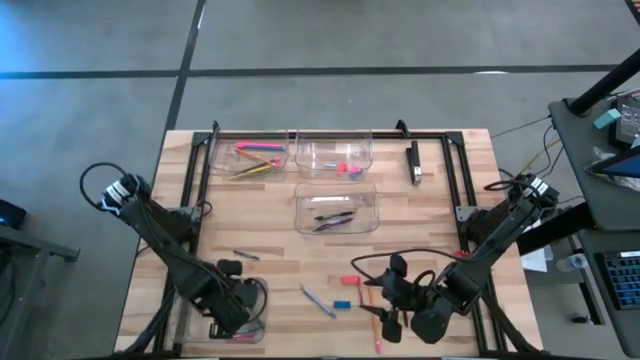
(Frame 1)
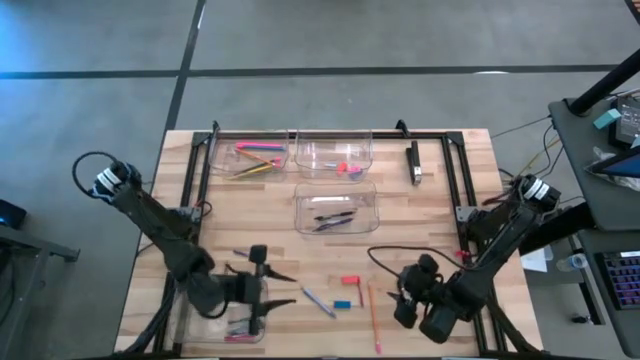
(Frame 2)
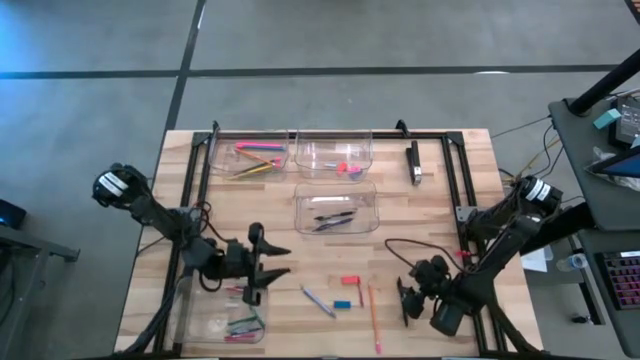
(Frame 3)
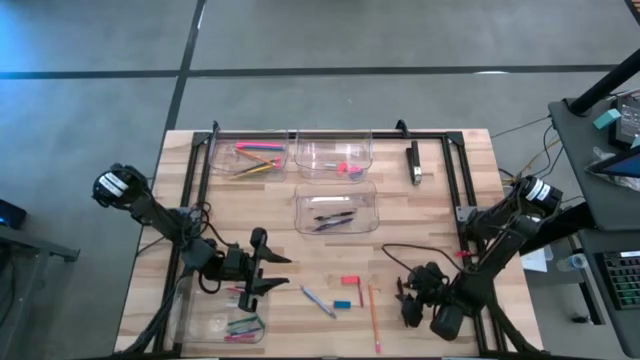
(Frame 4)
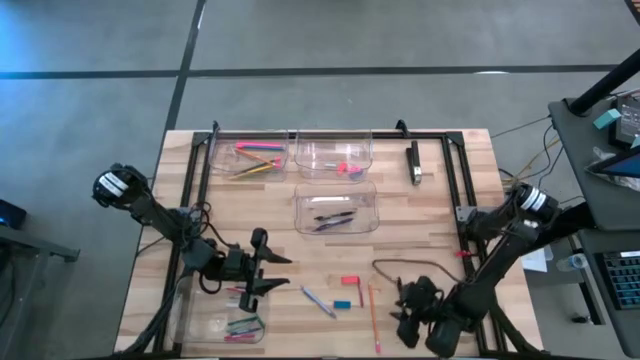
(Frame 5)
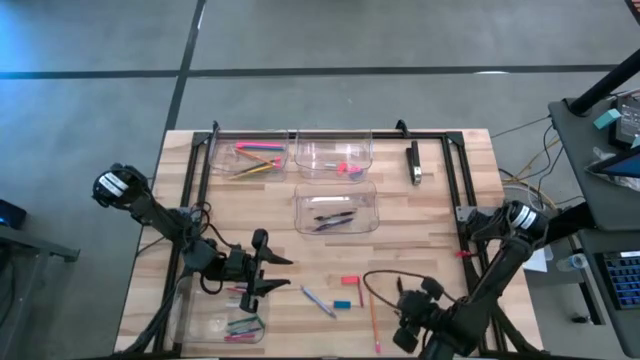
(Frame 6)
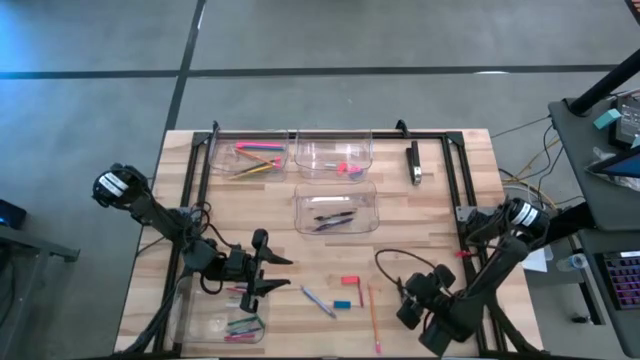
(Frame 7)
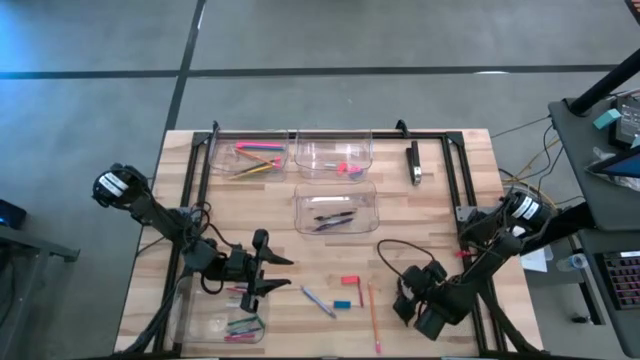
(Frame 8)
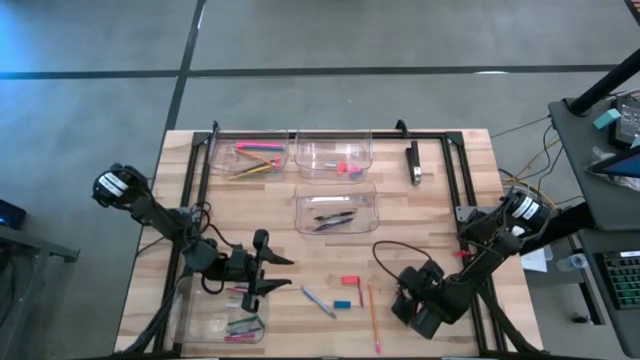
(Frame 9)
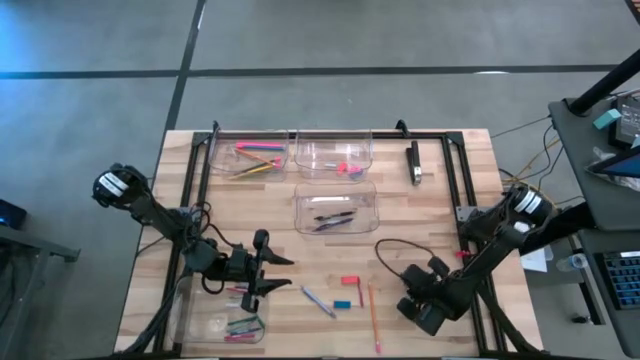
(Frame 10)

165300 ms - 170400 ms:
Task: Sort crayons/erasers/pens/pencils in bins
Put the black pen into the middle transparent bin

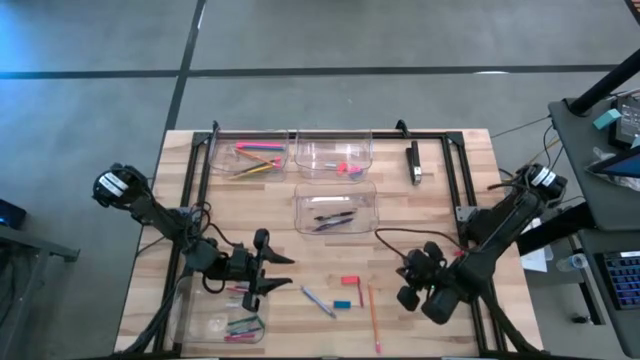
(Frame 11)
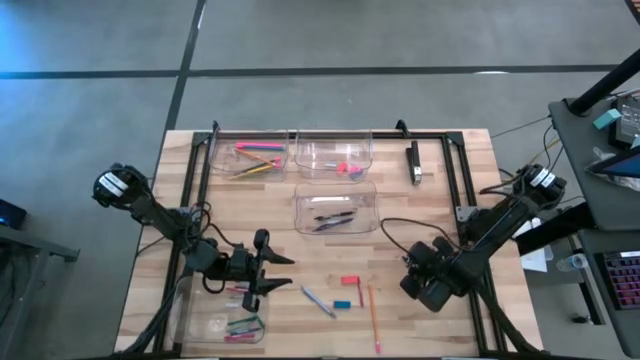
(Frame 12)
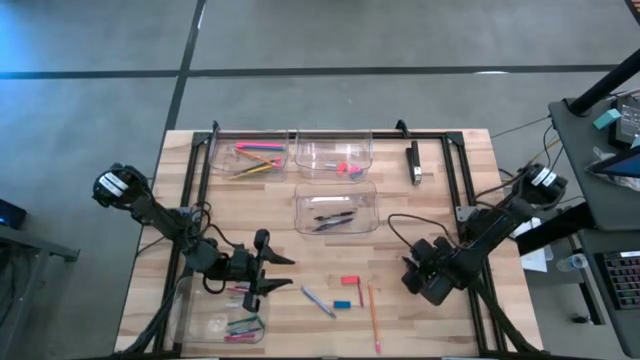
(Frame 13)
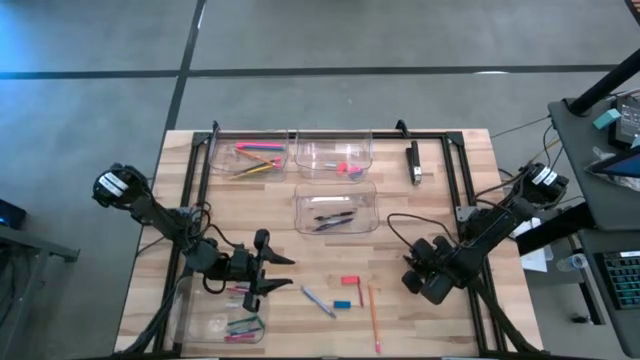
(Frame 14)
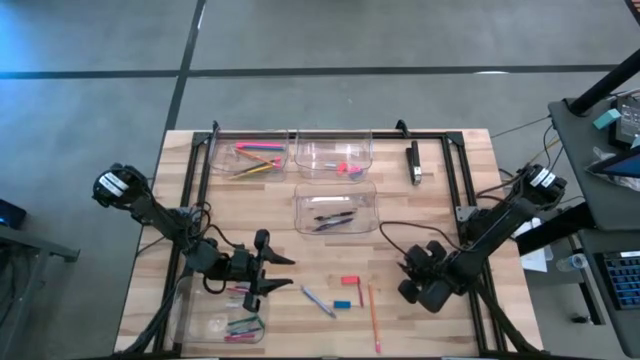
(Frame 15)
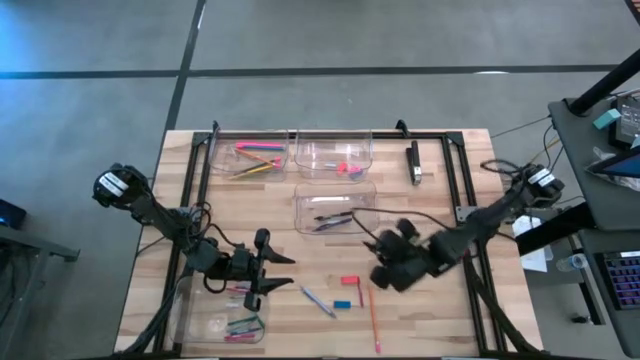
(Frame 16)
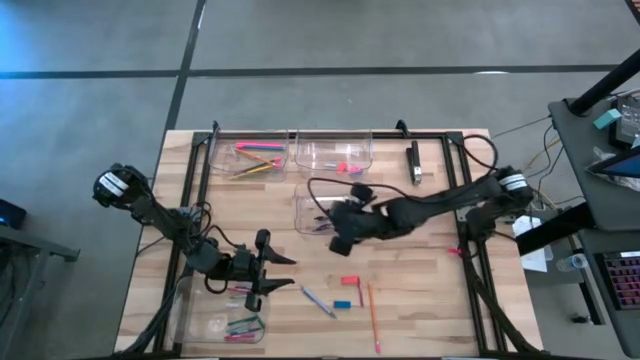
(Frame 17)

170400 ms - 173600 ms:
Put the black pen into the middle transparent bin

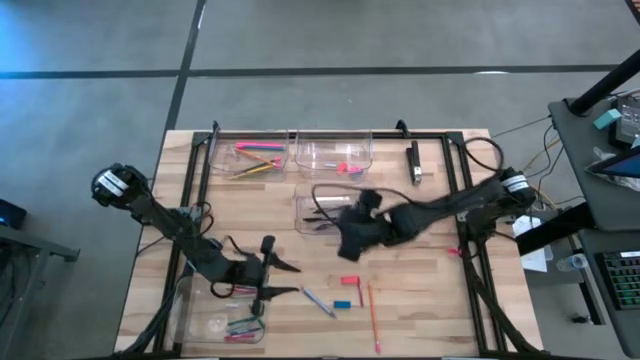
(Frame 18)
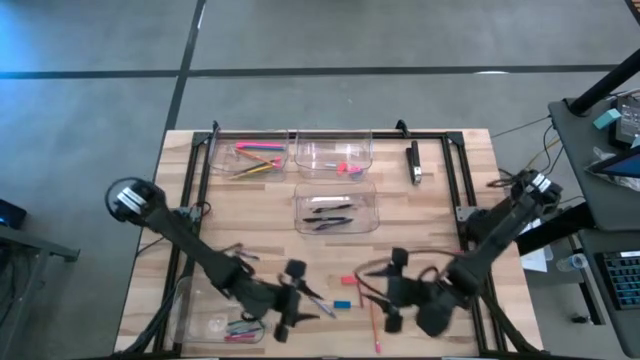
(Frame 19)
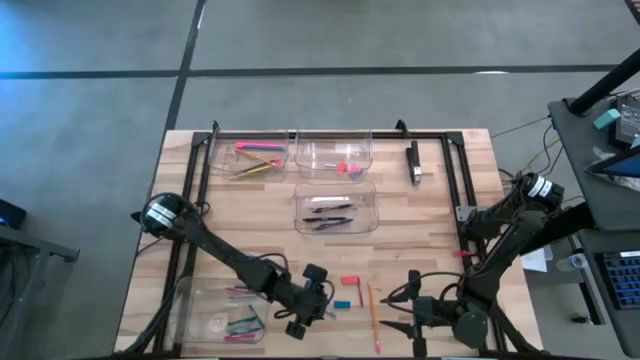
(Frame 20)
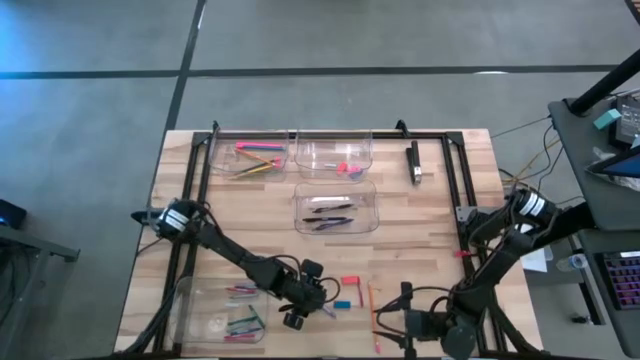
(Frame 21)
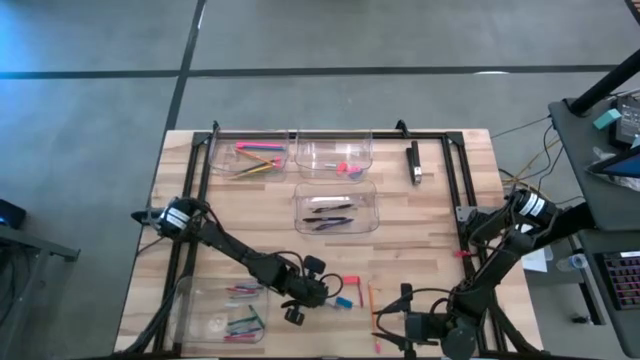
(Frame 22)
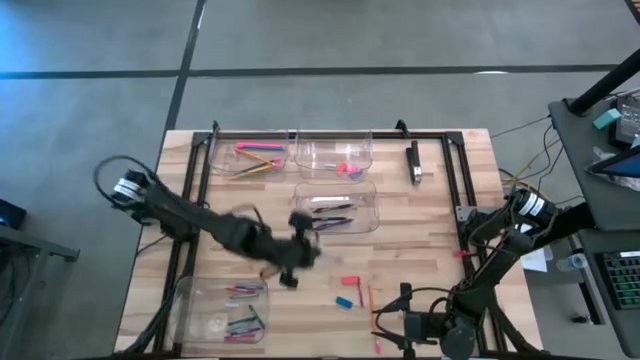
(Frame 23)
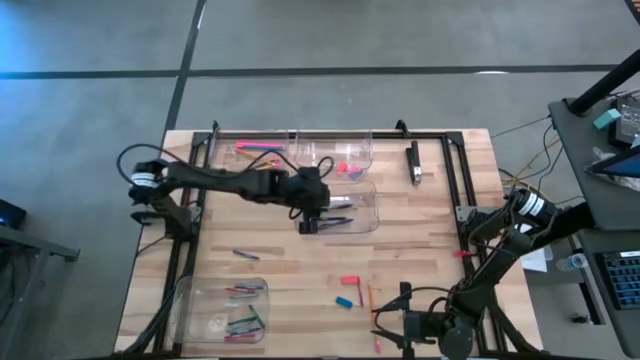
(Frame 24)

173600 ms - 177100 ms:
Put the violet pen into the middle transparent bin

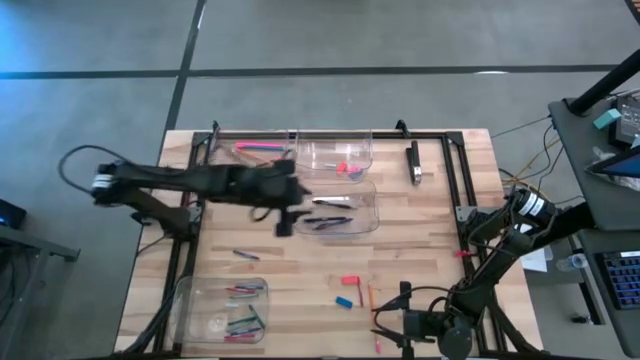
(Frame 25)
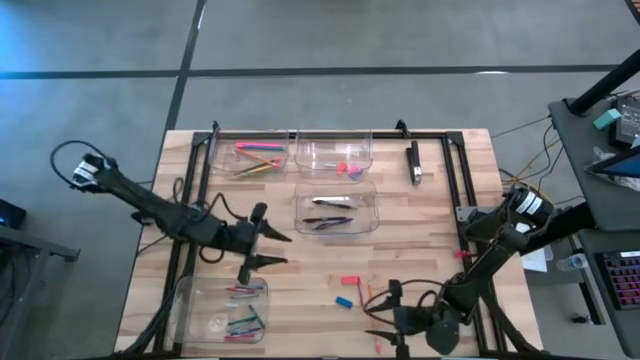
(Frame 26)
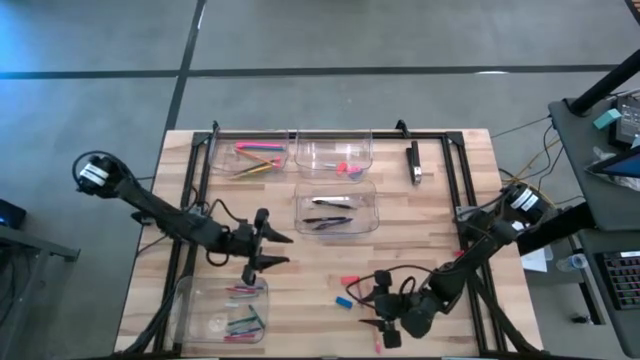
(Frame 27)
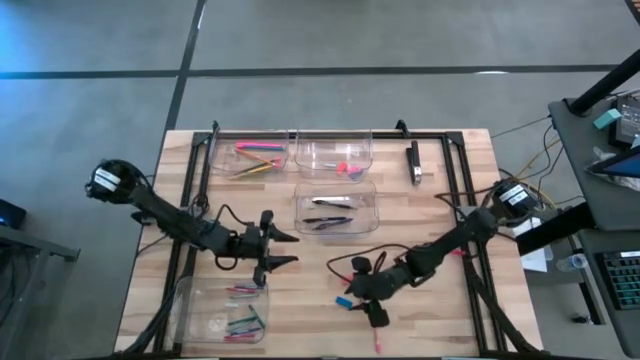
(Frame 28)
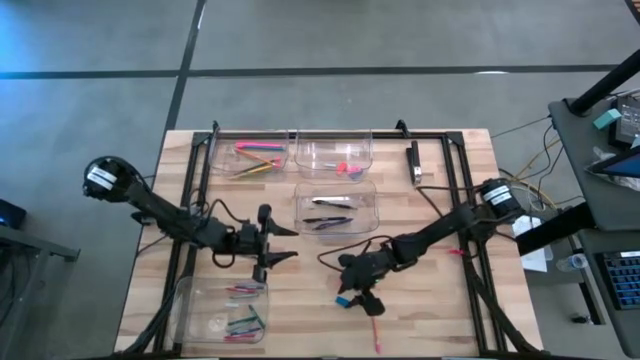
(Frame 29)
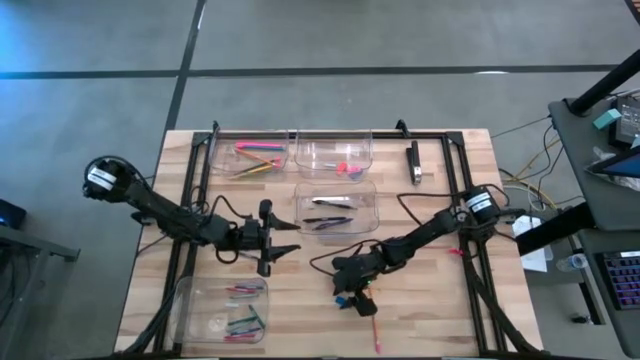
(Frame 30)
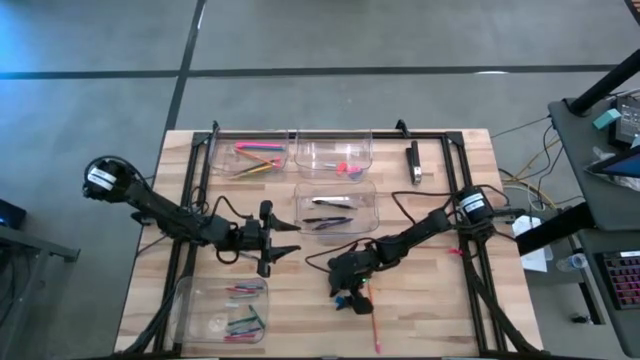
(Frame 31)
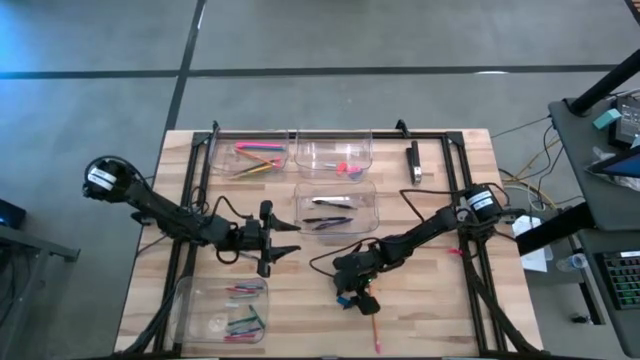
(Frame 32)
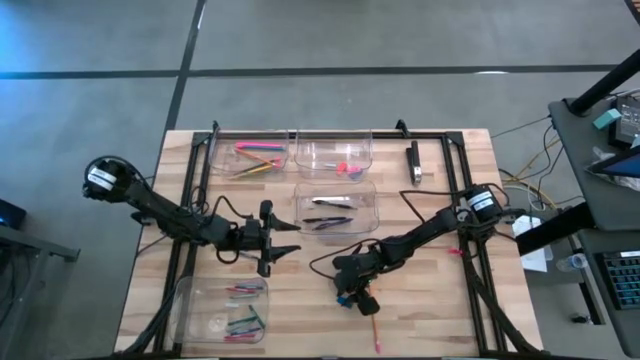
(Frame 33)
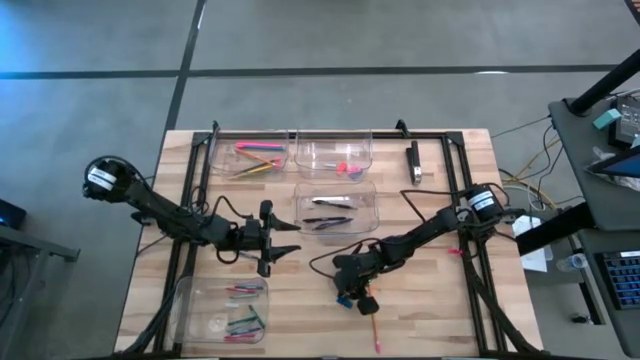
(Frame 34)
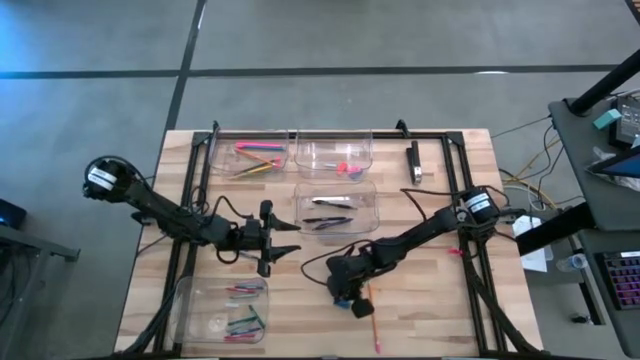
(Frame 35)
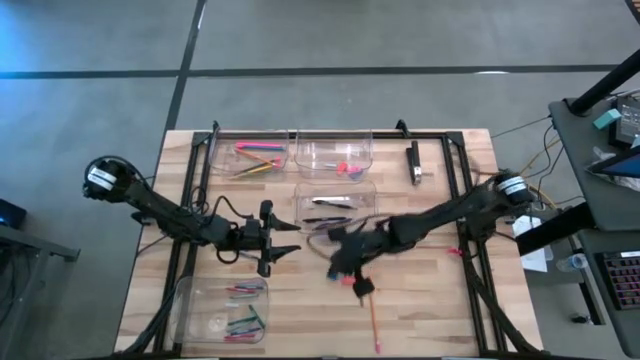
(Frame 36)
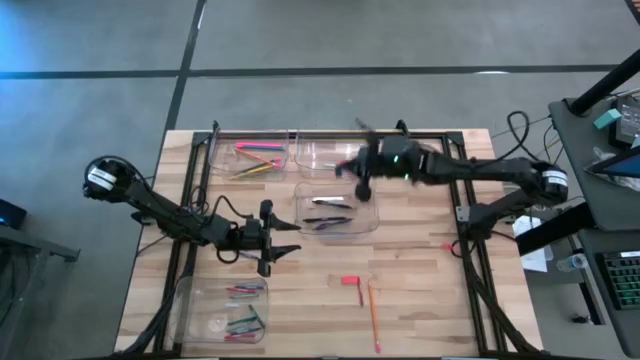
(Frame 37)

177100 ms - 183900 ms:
Put the blue eraser into the top right transparent bin

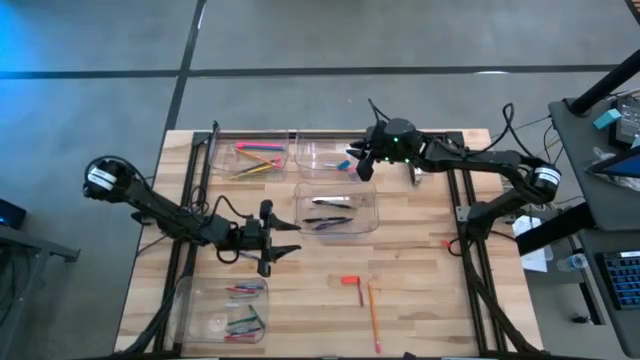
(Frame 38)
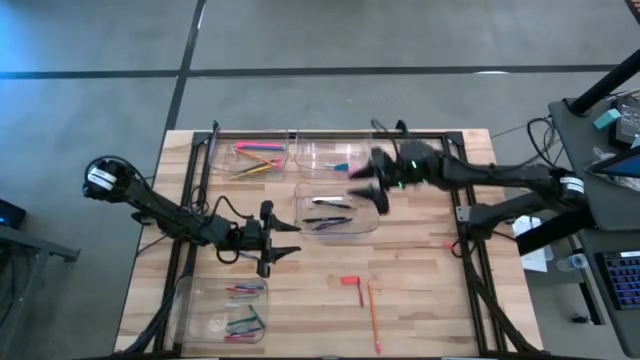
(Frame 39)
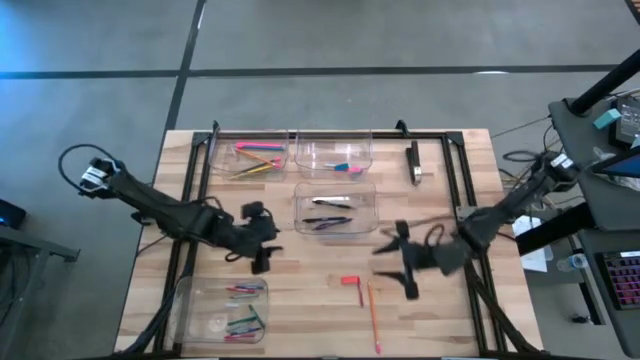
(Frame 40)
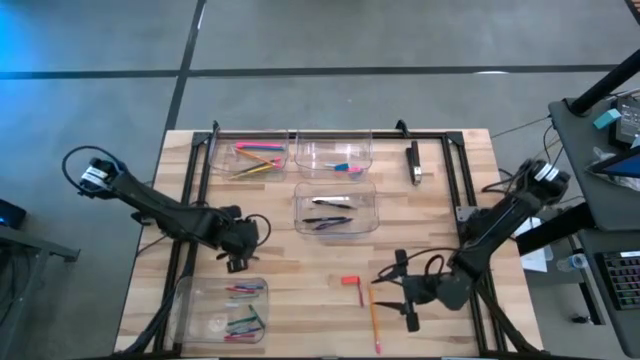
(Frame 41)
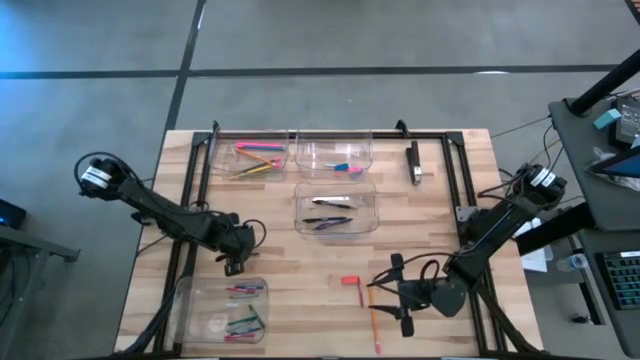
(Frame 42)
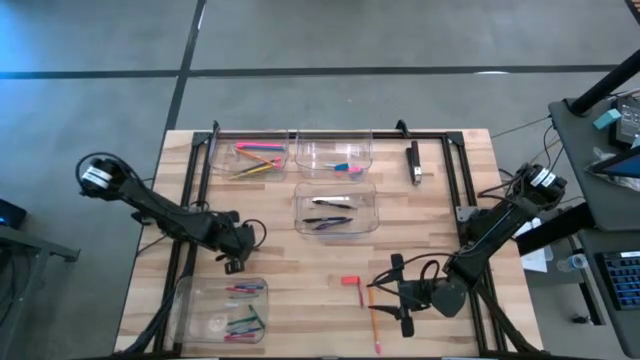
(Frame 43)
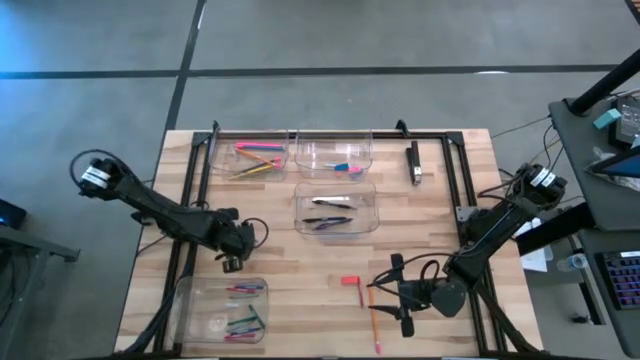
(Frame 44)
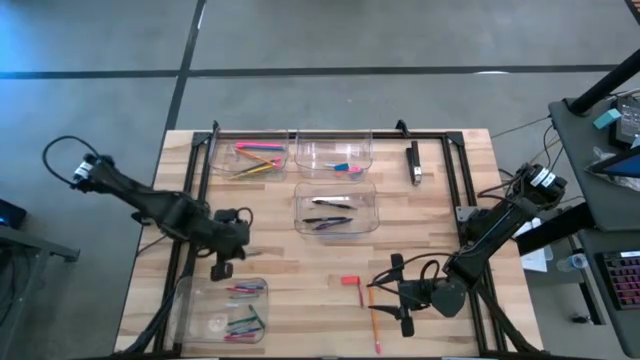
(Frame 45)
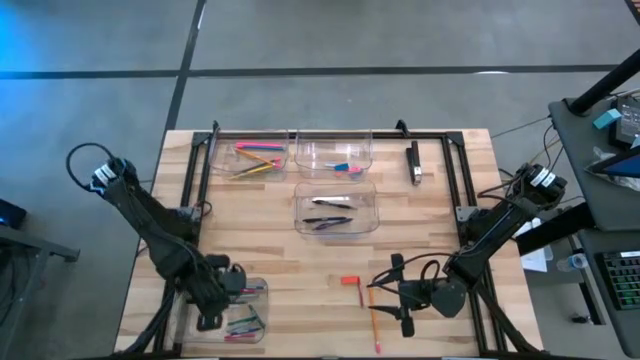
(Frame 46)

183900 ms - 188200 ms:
Put the blue crayon into the bottom transparent bin
